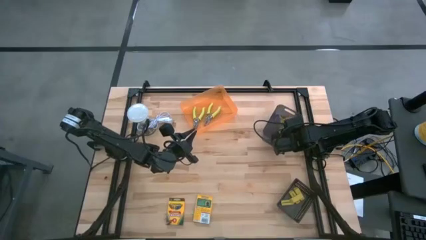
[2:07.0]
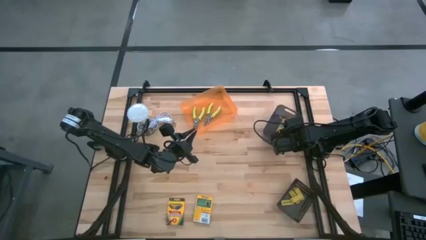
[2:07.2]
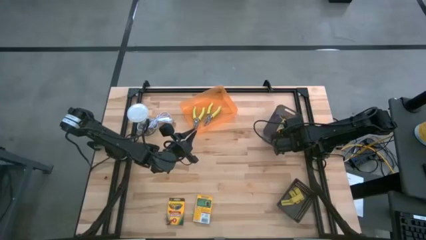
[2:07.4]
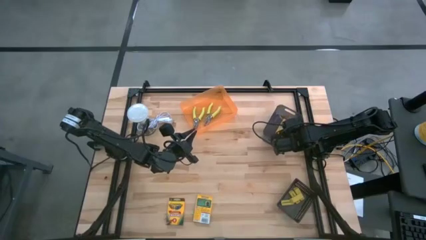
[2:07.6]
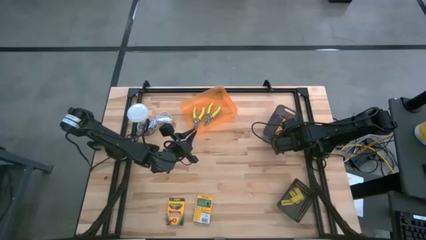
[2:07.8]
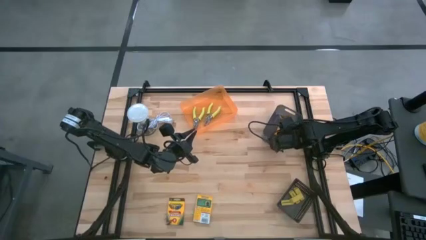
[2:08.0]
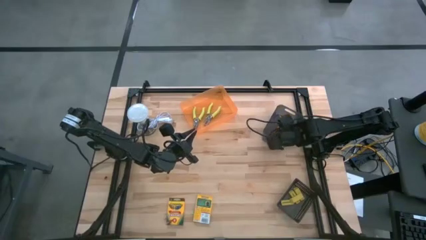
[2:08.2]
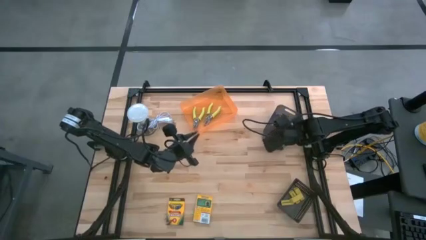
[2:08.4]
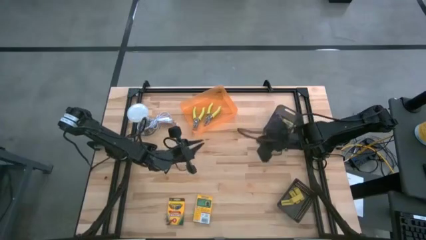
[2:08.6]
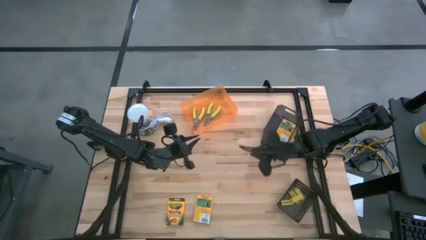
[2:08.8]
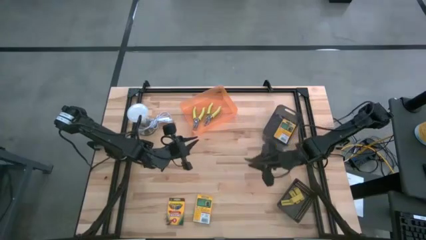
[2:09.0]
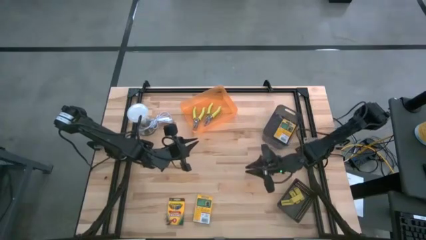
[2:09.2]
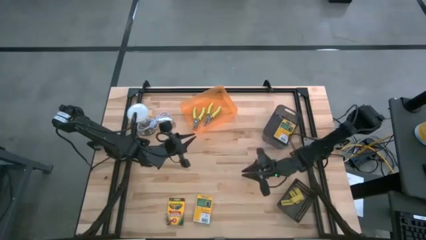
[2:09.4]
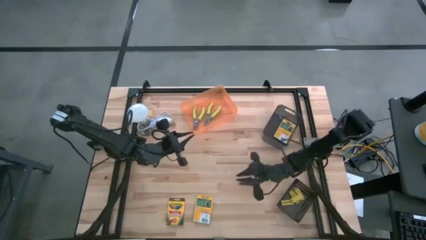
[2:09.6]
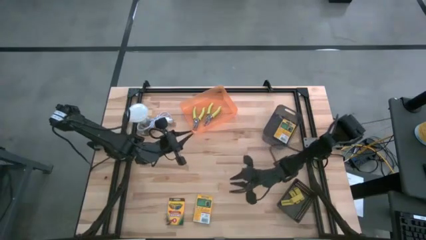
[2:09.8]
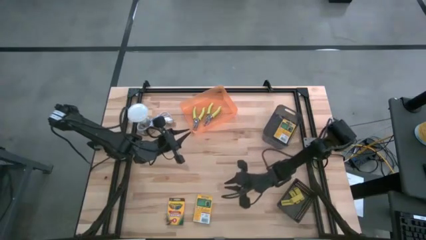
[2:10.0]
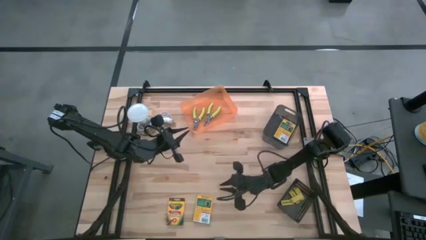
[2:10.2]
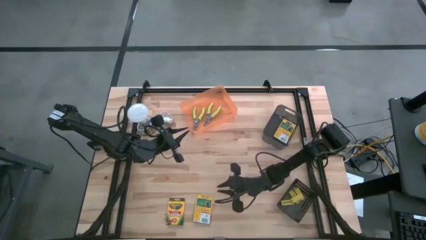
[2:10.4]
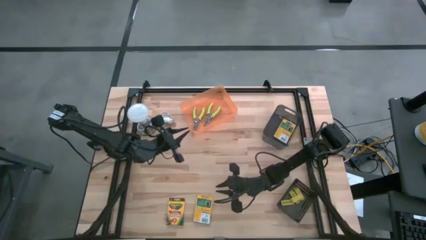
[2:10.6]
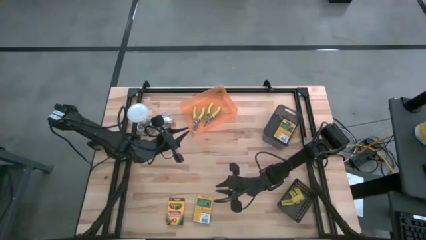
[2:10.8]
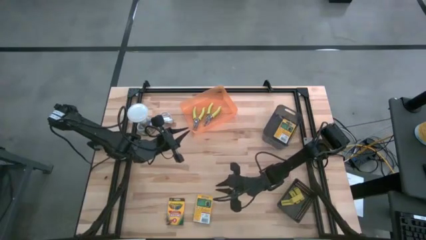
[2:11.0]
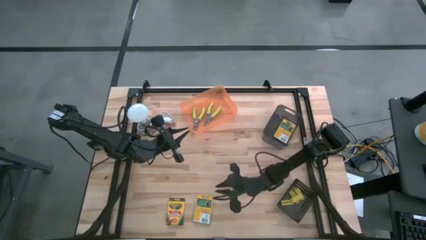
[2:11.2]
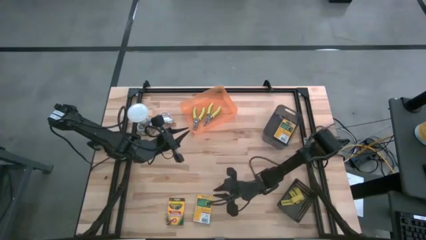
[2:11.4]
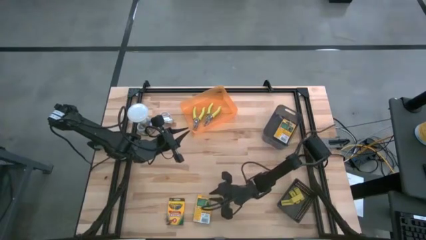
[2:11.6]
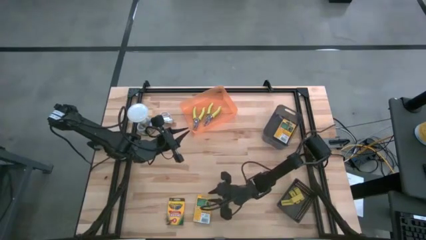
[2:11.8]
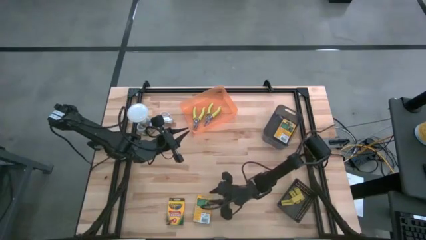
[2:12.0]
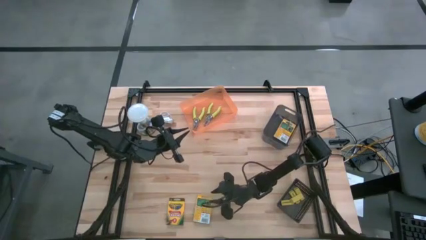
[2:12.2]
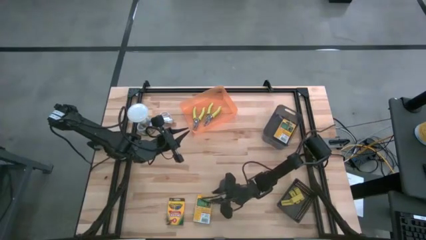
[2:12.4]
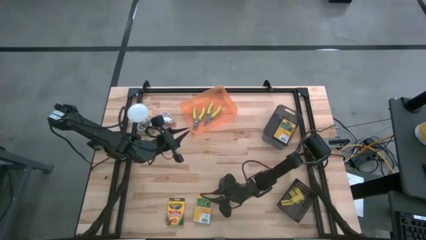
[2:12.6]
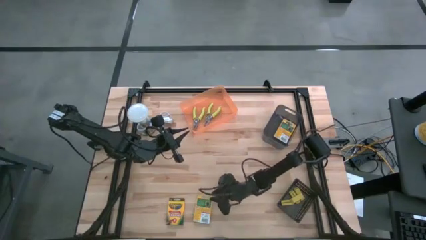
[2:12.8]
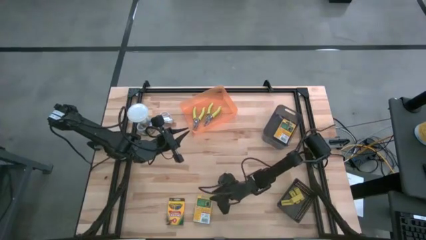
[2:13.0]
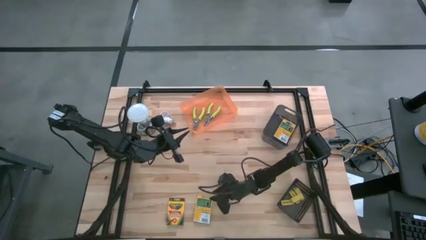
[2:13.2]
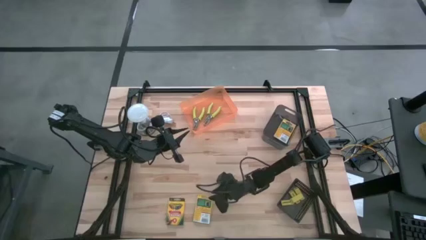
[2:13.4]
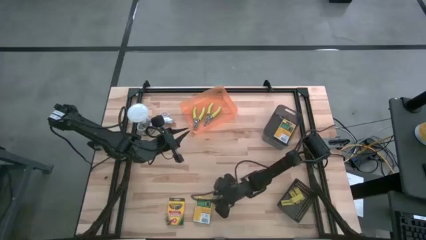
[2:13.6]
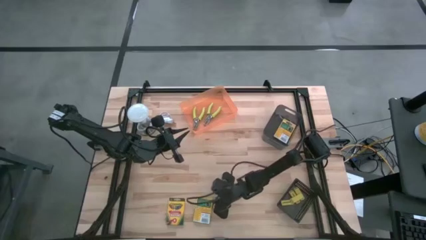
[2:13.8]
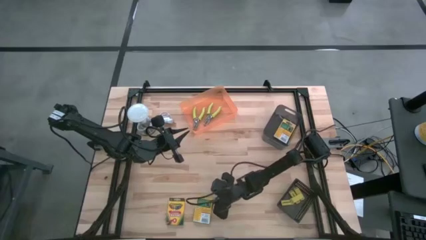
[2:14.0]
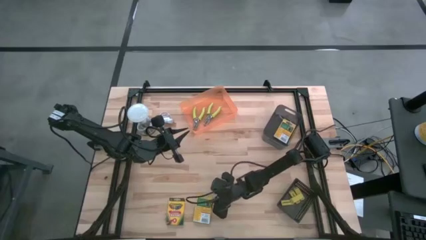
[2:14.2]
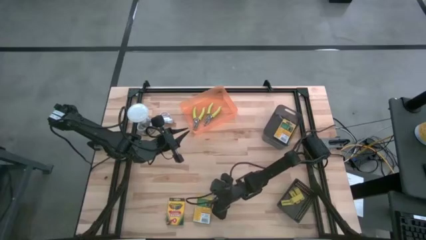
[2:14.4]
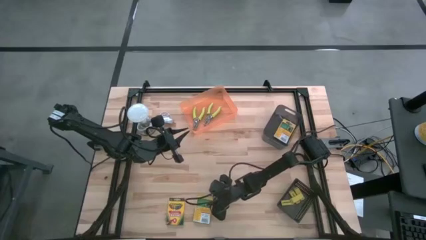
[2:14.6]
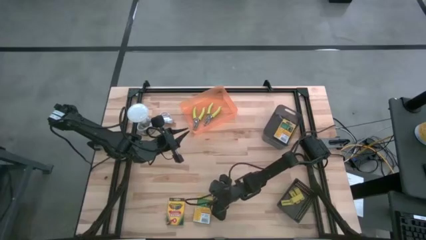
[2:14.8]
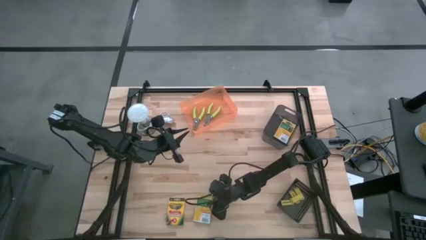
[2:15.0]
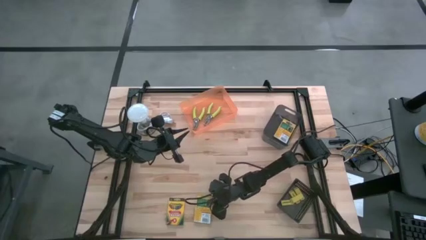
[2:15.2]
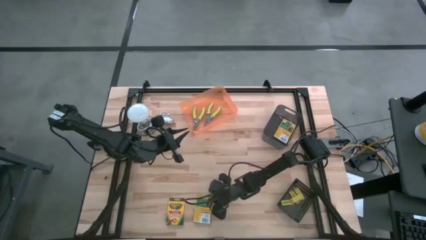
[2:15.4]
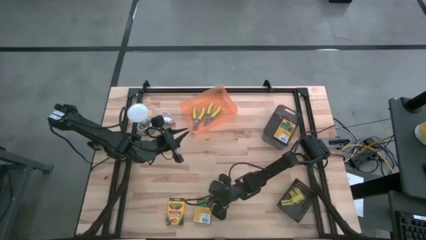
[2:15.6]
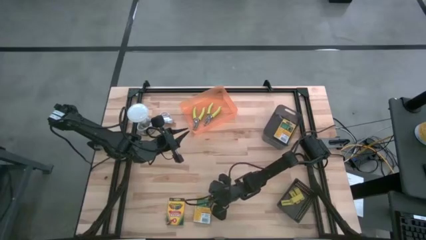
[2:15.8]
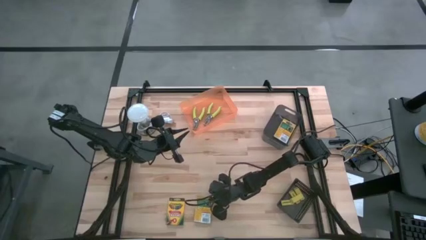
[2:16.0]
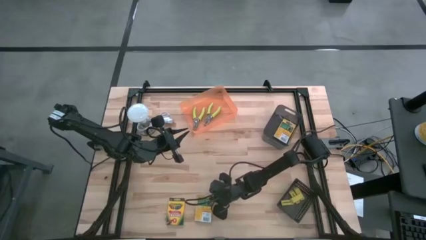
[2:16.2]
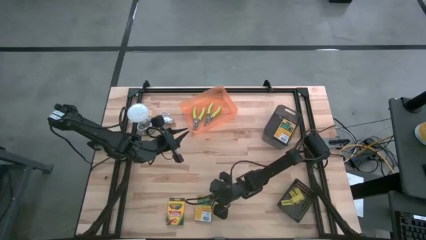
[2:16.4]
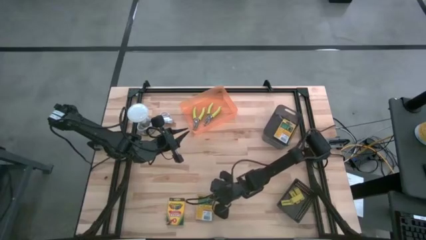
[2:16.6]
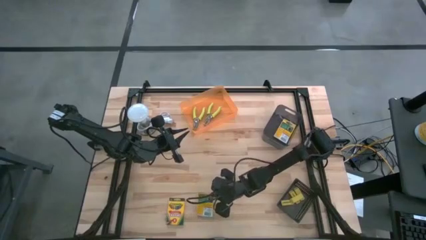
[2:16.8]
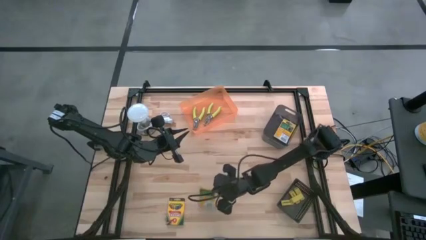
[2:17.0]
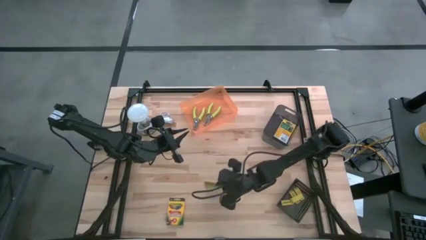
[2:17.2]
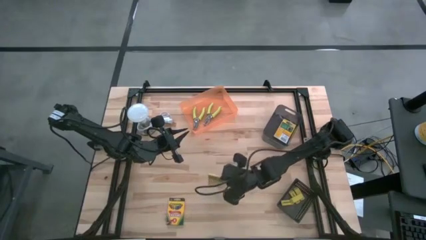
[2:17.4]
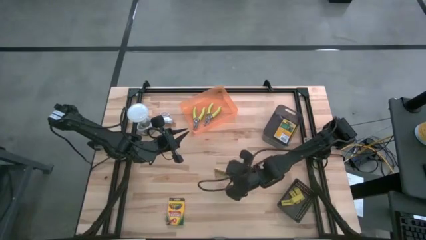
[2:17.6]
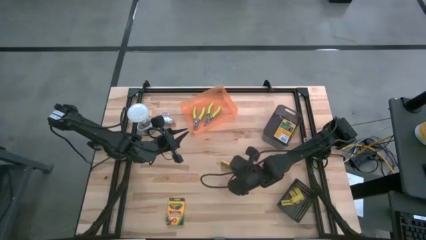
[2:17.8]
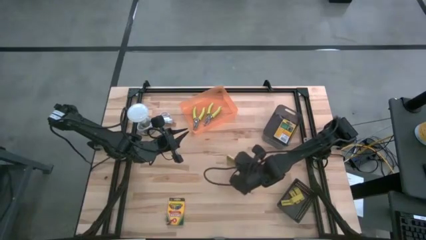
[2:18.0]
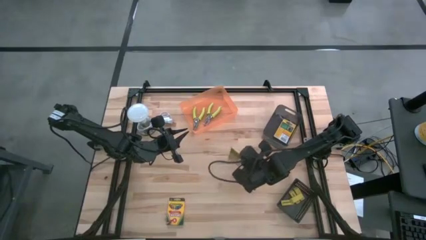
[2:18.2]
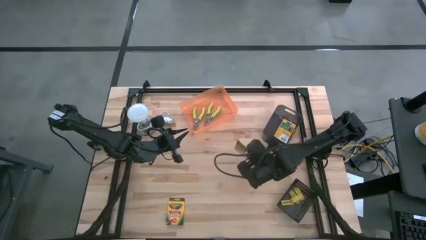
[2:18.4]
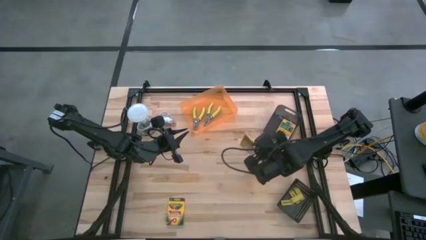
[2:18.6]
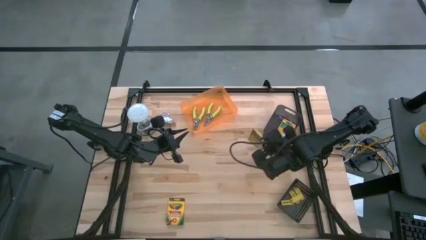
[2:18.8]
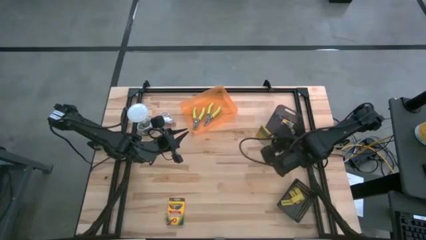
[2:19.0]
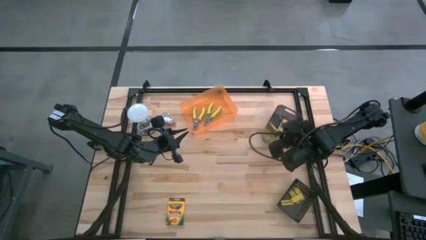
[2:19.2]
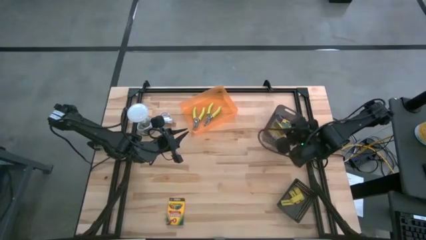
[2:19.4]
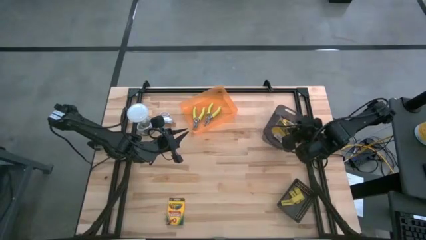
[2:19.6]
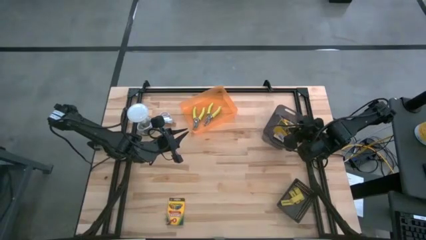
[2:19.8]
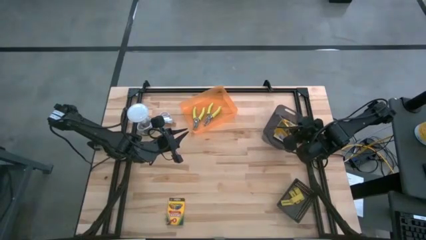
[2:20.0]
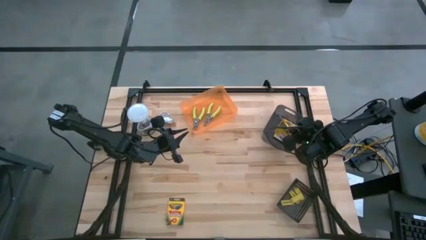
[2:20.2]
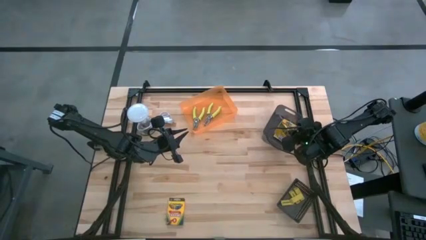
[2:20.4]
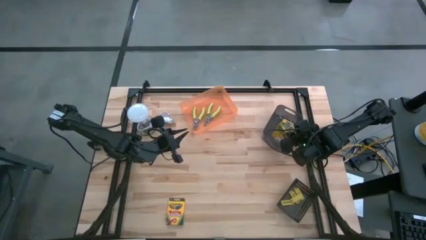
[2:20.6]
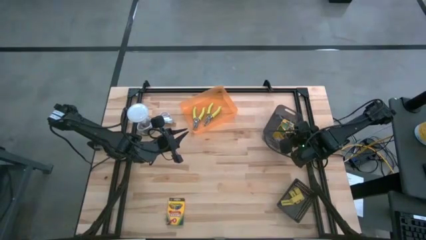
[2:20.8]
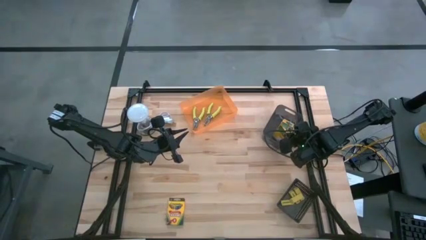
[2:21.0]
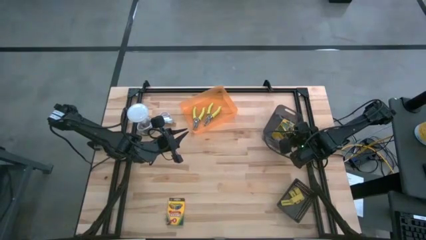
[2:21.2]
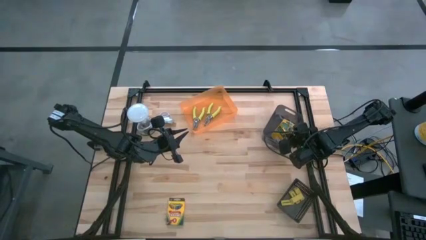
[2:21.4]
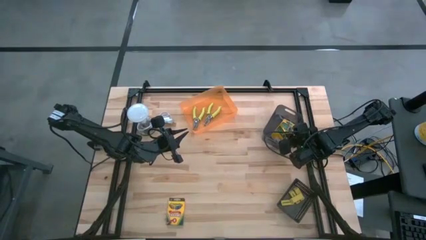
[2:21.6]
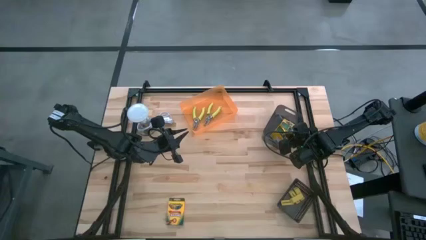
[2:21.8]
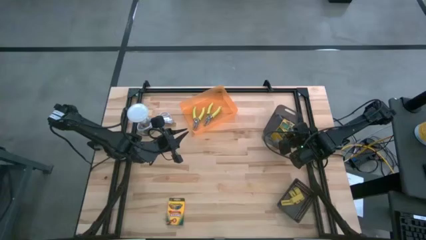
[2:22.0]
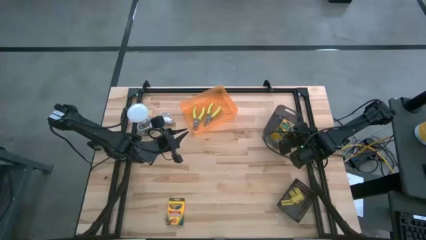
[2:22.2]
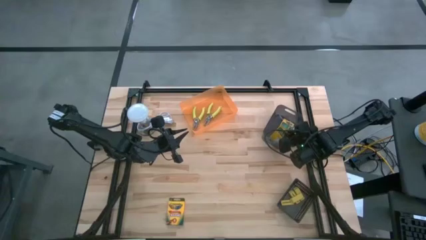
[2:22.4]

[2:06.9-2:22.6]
Task: Pick & Place School Supplies
Put the crayon box into the light black bin

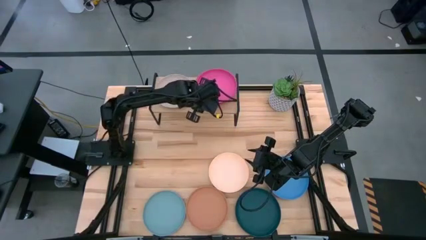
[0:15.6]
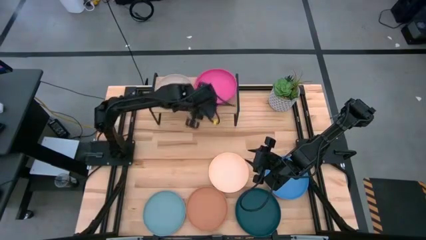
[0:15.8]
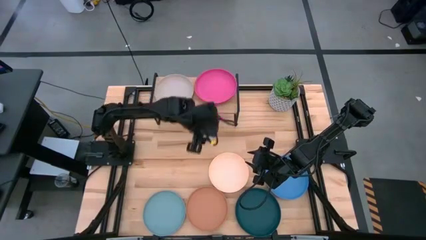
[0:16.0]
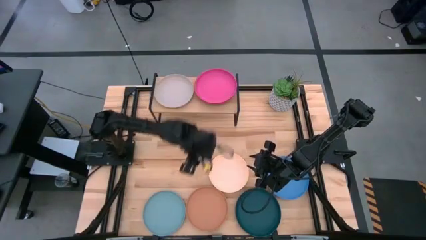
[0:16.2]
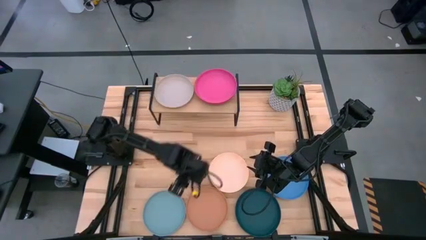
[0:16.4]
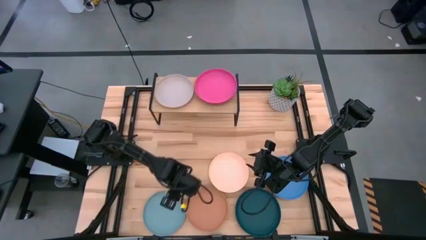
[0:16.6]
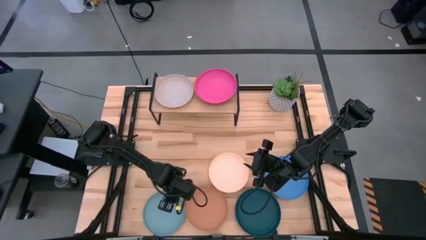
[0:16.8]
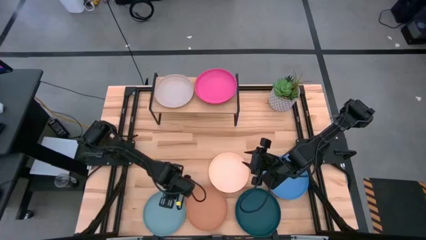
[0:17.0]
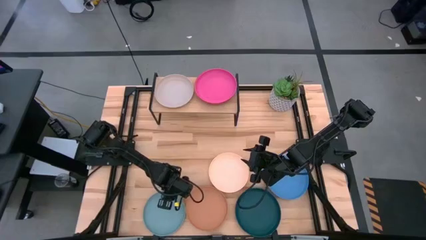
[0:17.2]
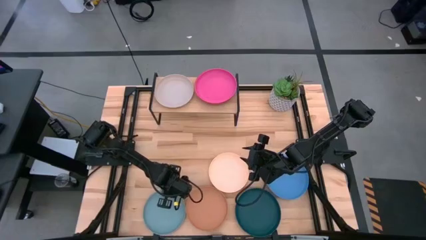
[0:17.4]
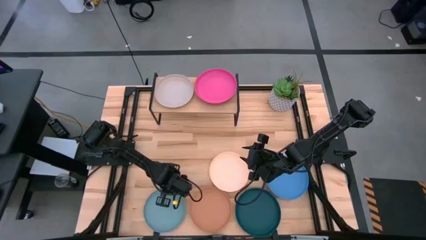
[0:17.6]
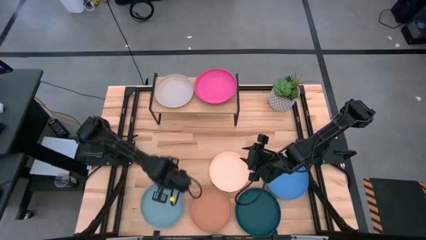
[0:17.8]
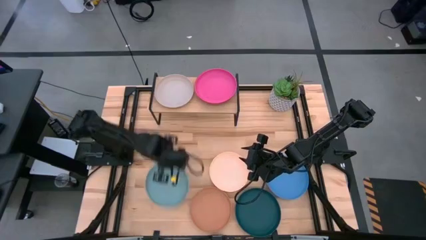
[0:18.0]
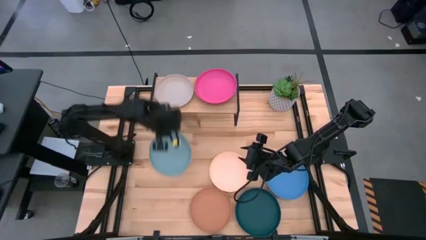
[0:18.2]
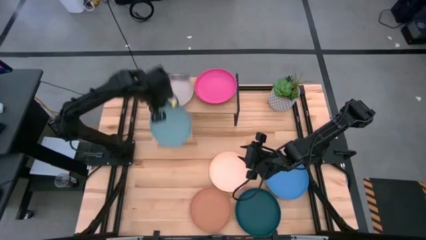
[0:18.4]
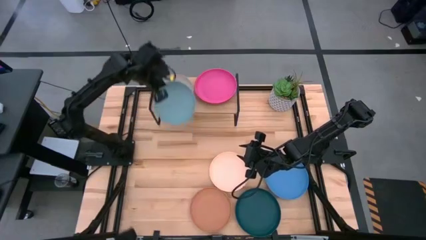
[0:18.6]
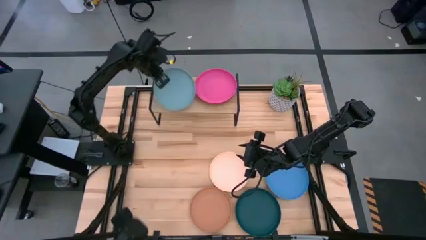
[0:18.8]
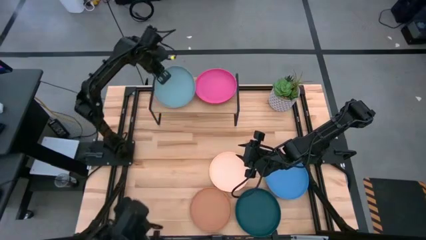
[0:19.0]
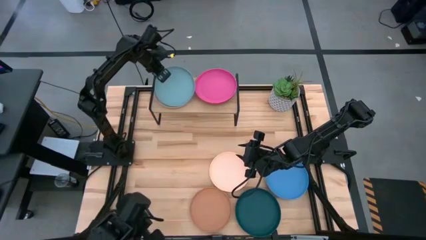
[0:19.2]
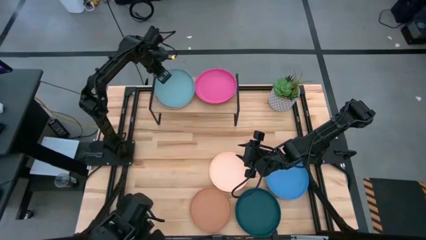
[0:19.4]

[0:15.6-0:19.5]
Task: Place and stack plates onto a shelf
Stack the light blue plate on top of the gray plate on the shelf
